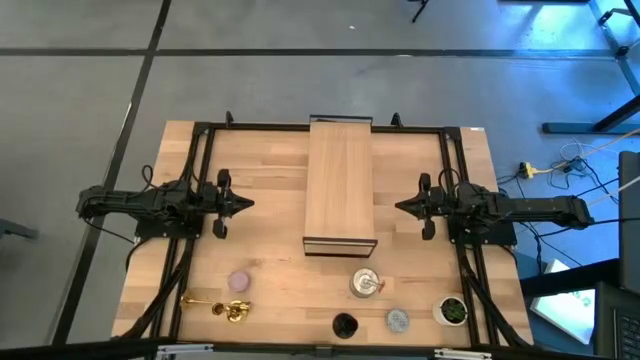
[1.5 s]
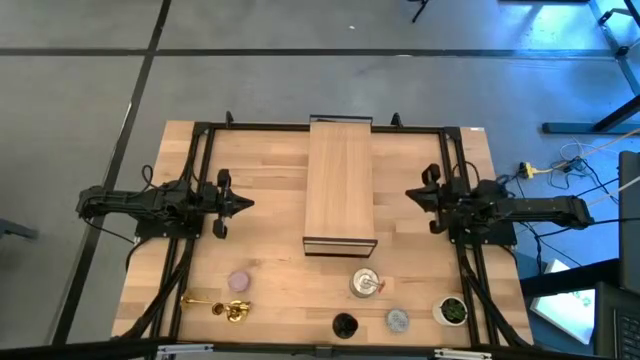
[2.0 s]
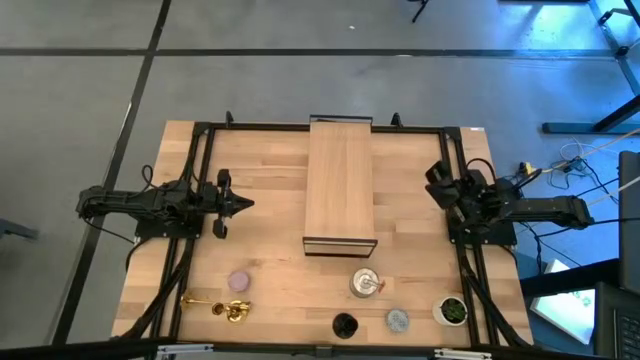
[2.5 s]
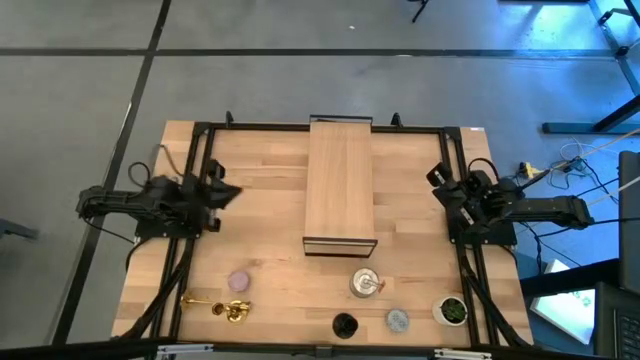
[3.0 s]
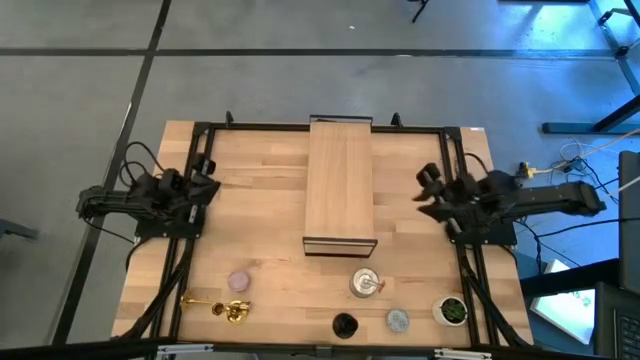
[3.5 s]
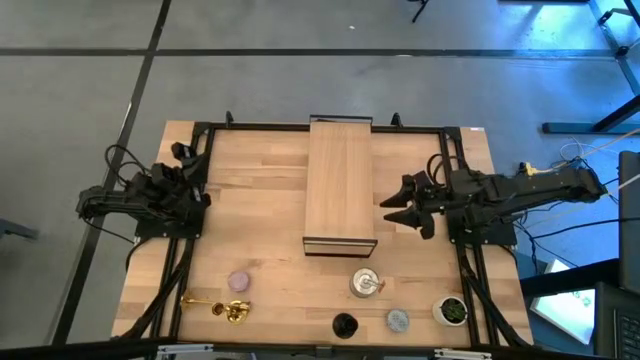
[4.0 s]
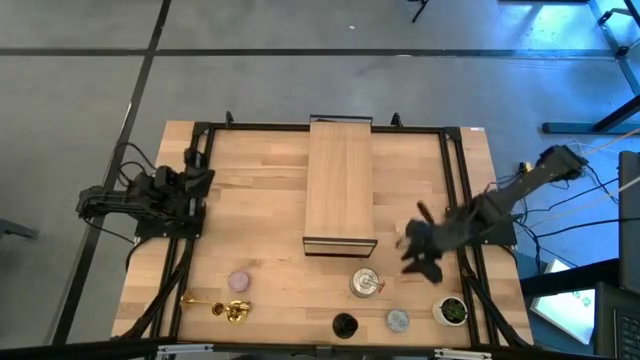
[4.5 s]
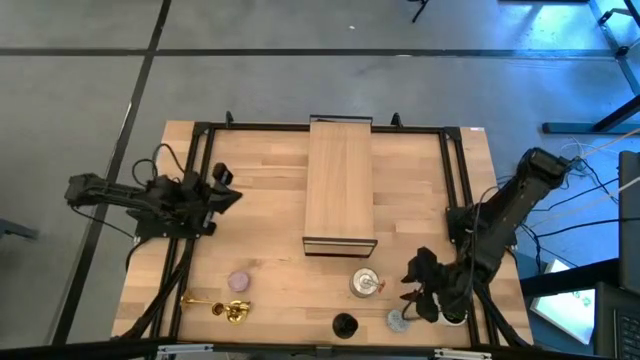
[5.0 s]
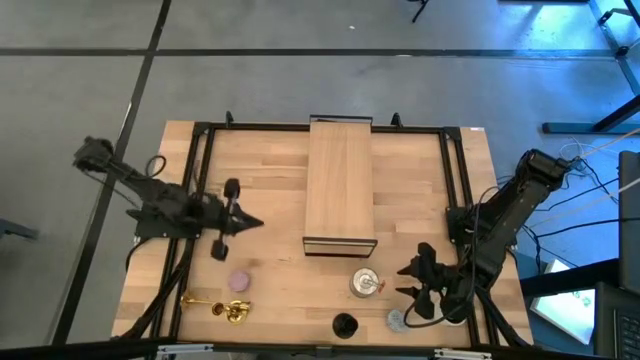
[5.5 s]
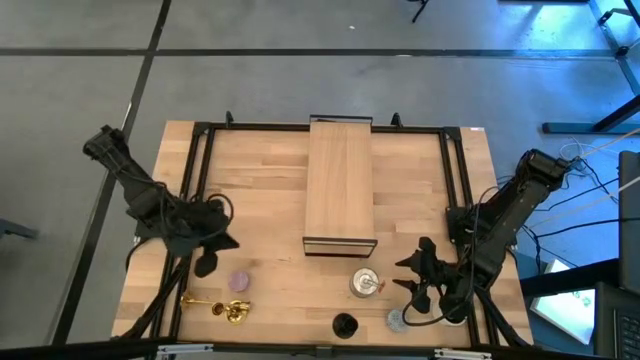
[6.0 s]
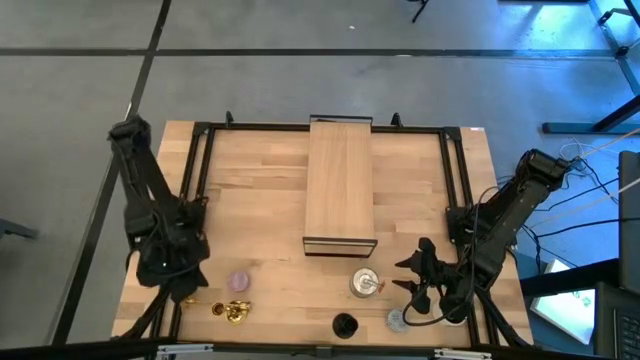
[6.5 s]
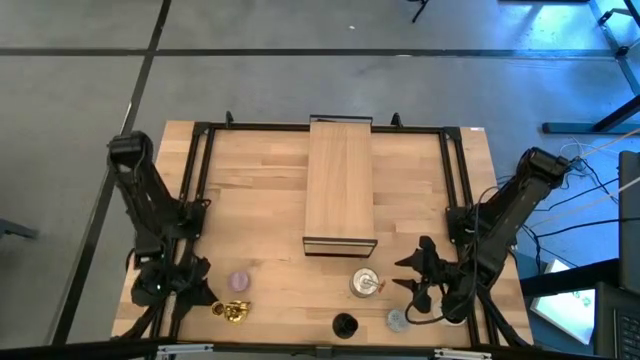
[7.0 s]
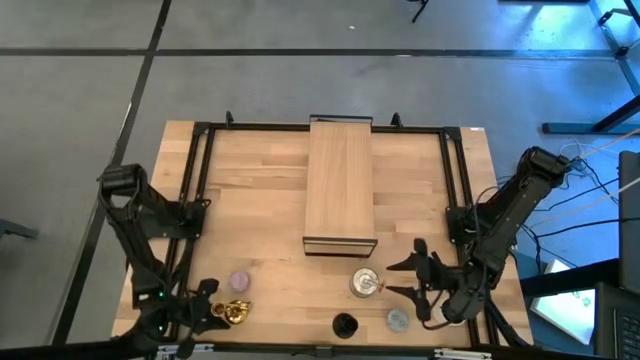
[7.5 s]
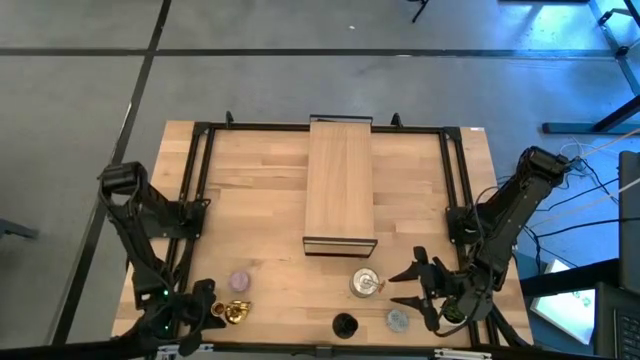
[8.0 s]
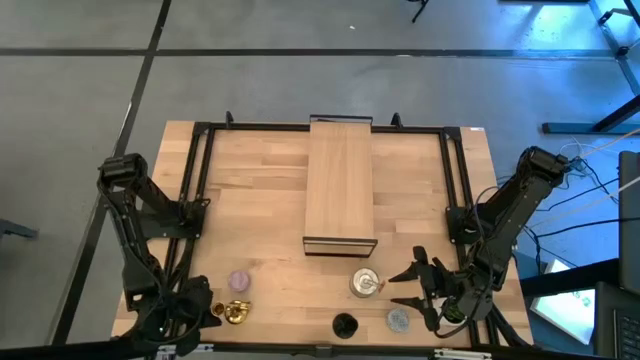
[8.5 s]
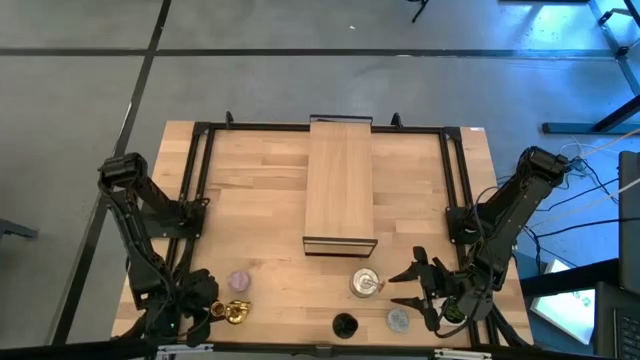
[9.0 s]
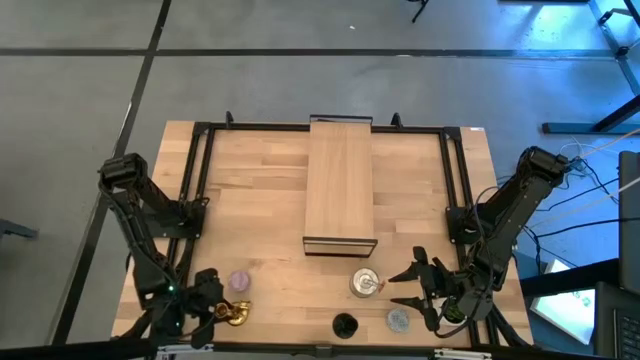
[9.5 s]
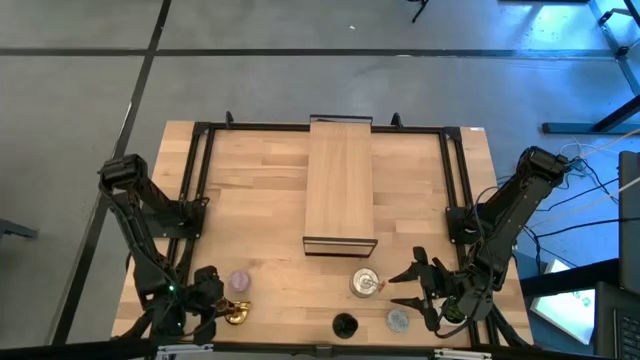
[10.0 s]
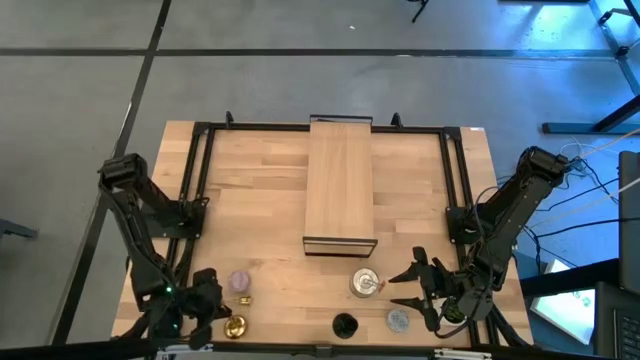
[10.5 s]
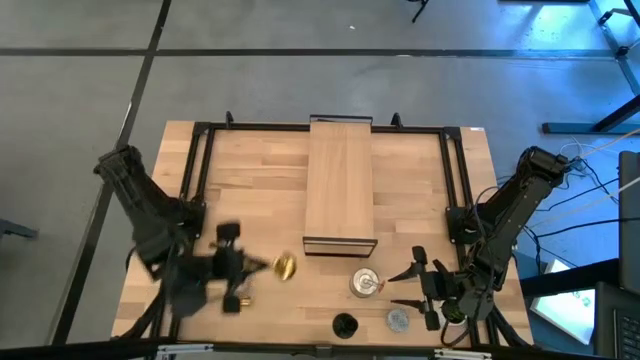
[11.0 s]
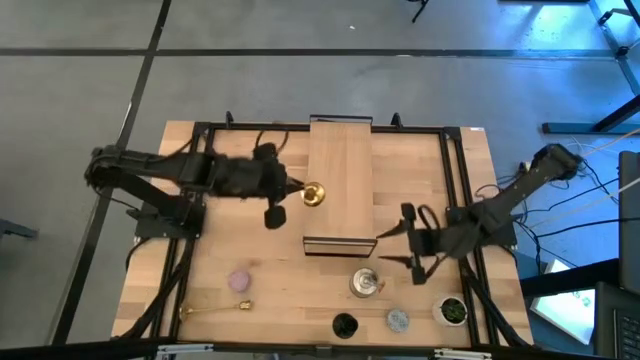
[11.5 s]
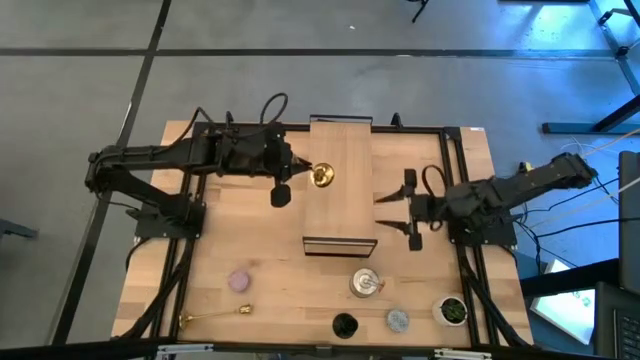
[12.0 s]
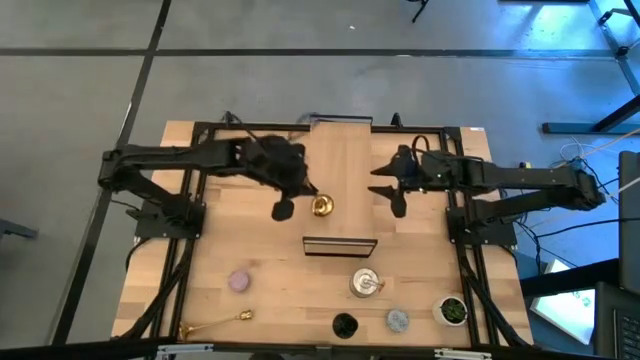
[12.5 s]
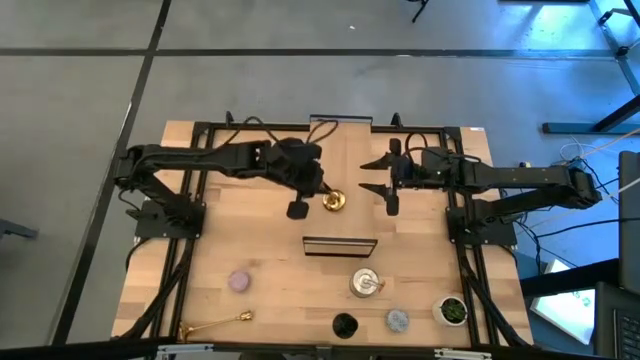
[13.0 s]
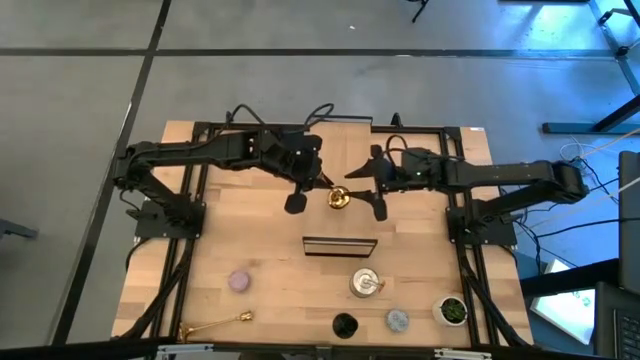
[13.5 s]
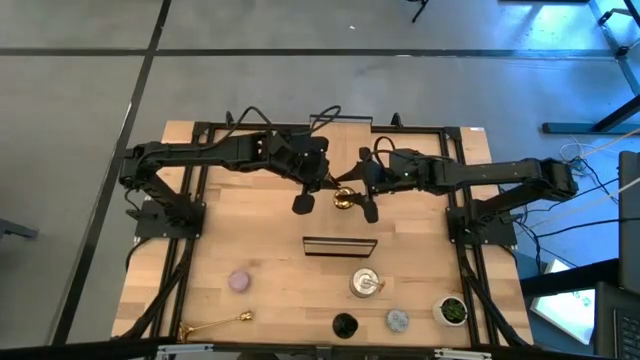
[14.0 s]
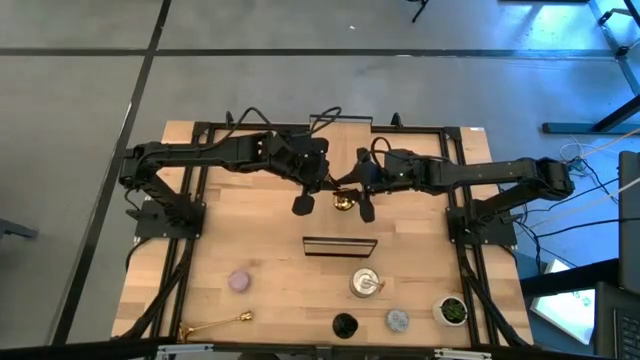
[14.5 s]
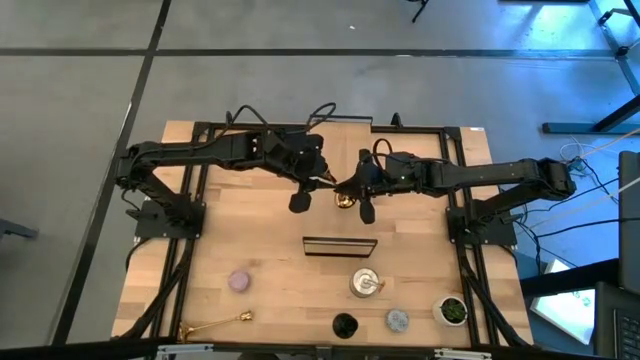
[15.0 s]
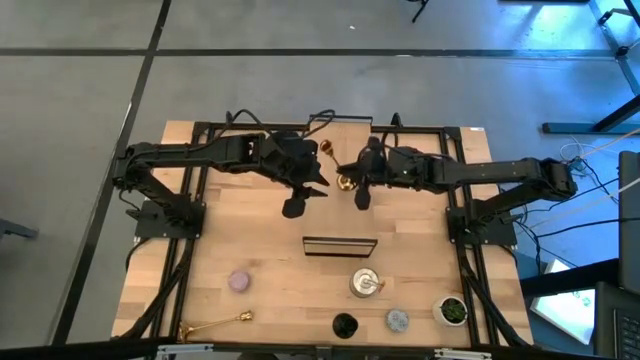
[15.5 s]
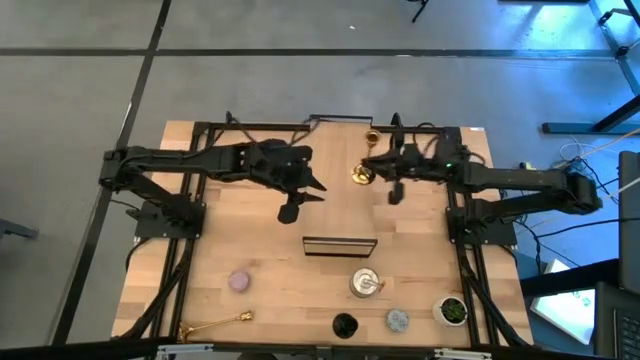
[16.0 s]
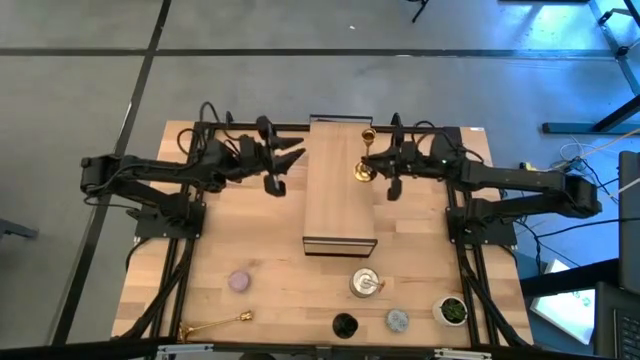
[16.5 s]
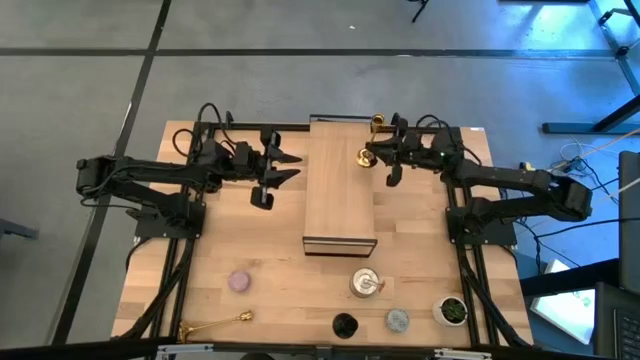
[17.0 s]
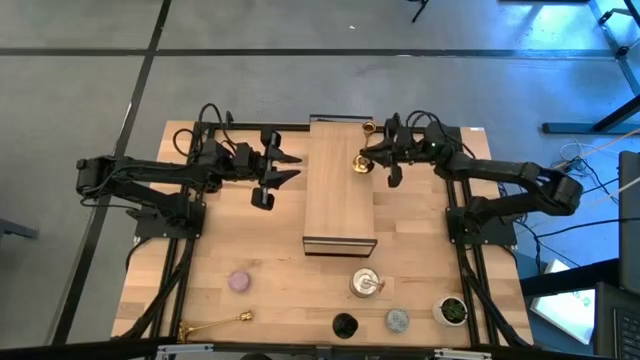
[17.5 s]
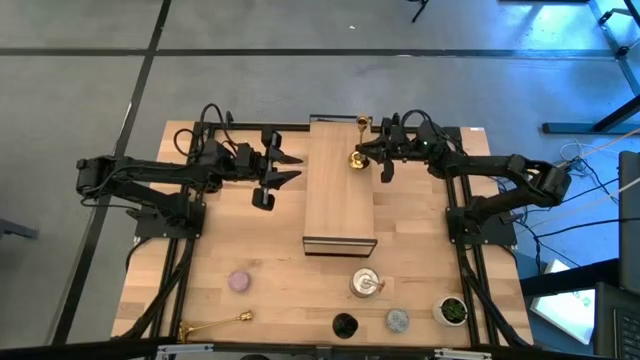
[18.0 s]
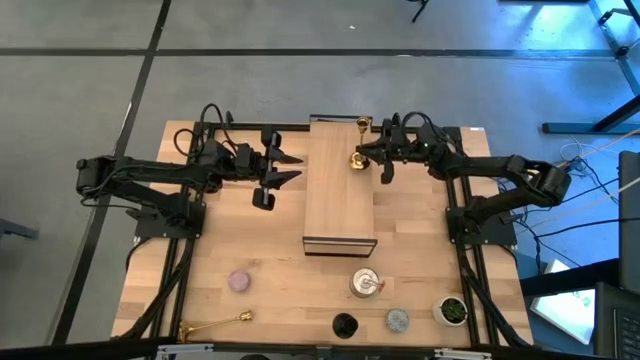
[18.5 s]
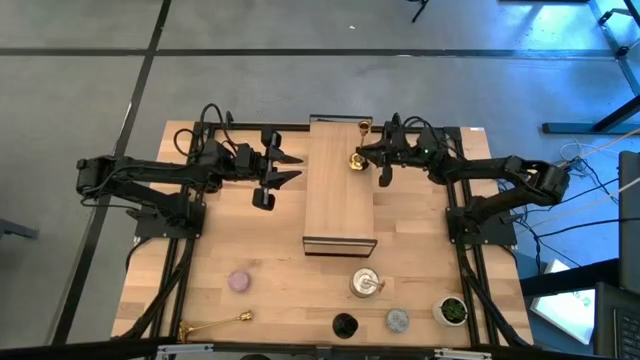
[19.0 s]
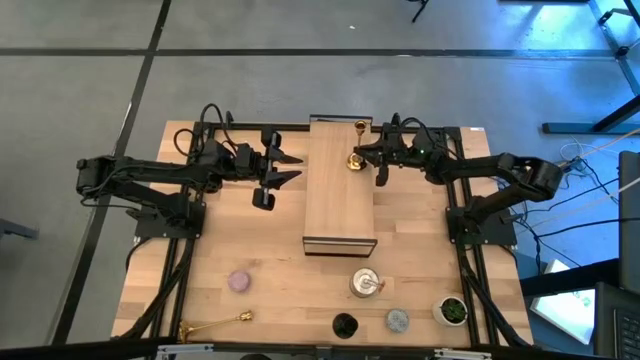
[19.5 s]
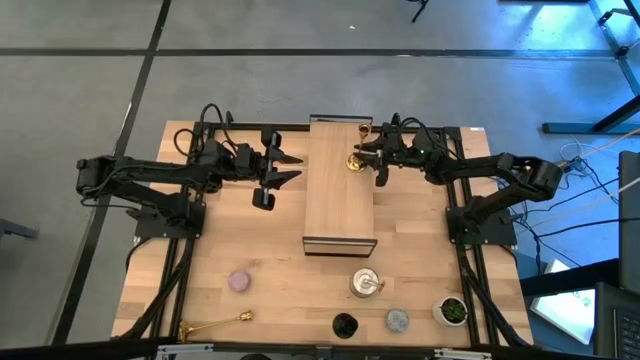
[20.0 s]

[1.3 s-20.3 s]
Task: Pick & Place candle stick holders
Put the right golden candle holder on the shelf
